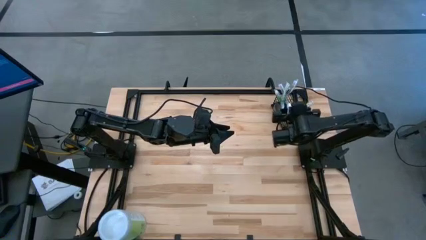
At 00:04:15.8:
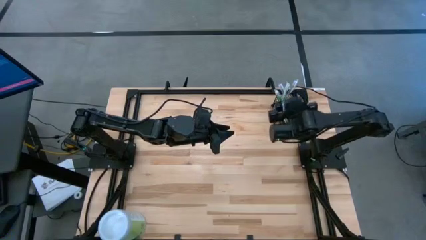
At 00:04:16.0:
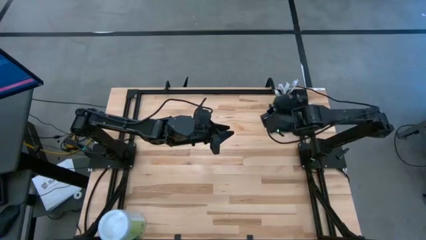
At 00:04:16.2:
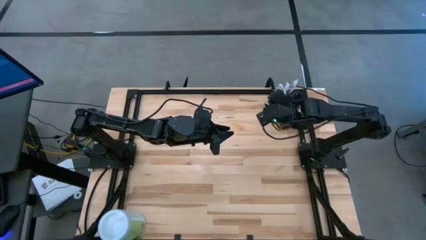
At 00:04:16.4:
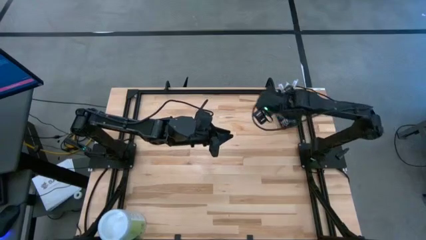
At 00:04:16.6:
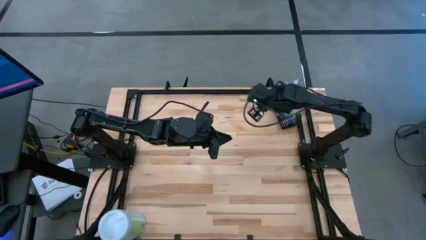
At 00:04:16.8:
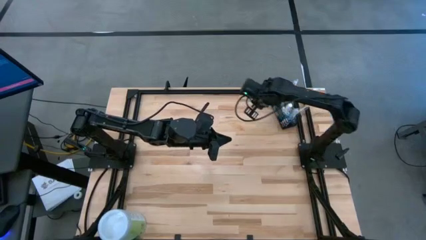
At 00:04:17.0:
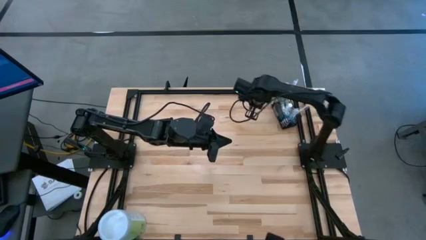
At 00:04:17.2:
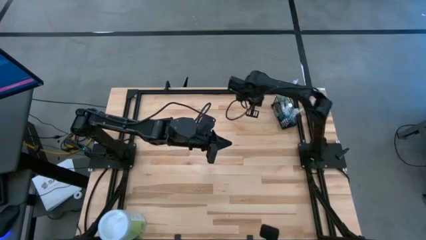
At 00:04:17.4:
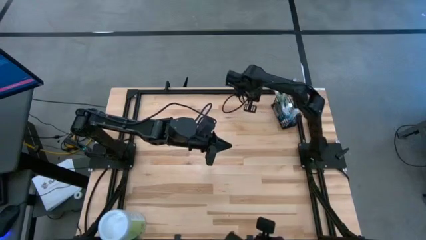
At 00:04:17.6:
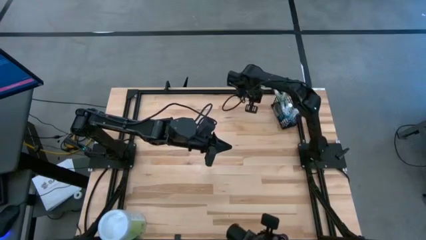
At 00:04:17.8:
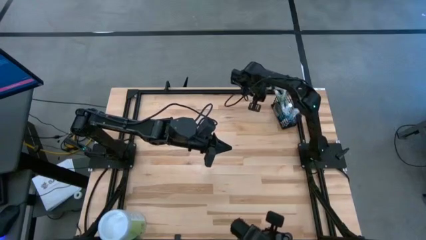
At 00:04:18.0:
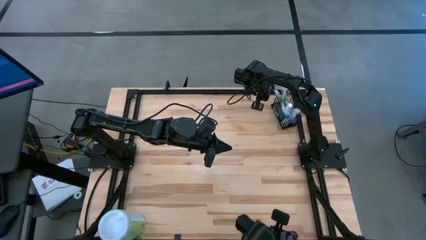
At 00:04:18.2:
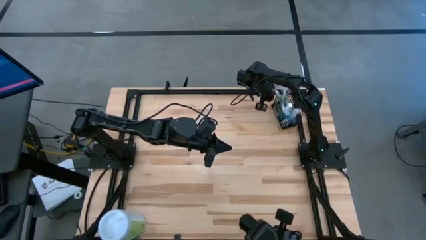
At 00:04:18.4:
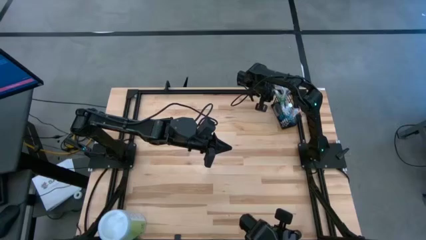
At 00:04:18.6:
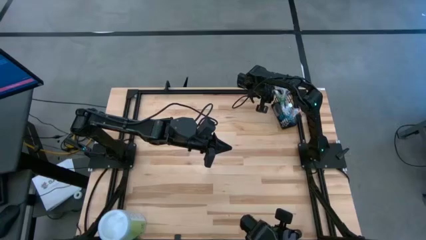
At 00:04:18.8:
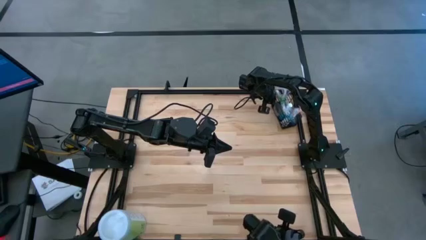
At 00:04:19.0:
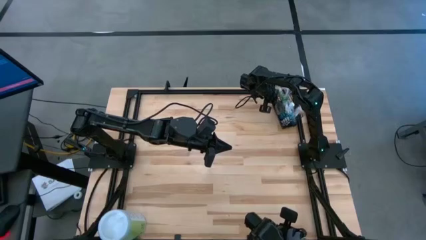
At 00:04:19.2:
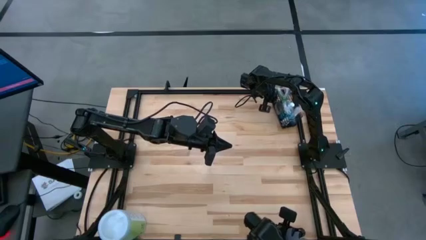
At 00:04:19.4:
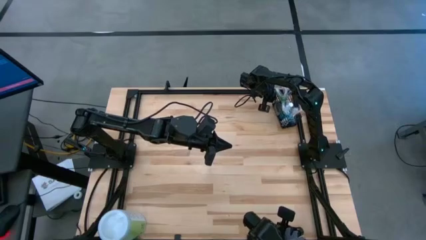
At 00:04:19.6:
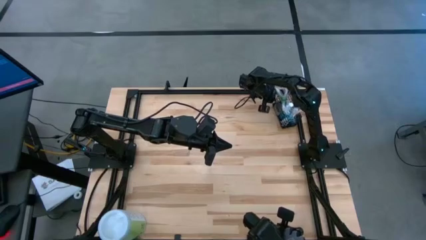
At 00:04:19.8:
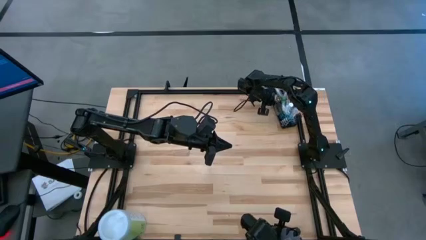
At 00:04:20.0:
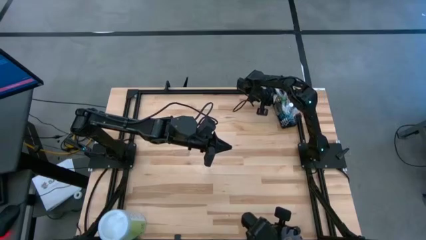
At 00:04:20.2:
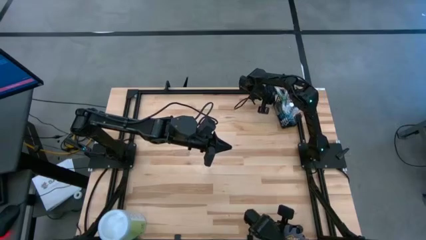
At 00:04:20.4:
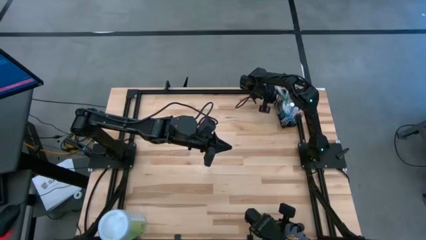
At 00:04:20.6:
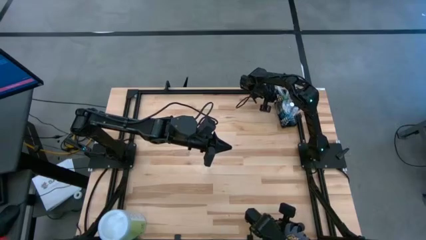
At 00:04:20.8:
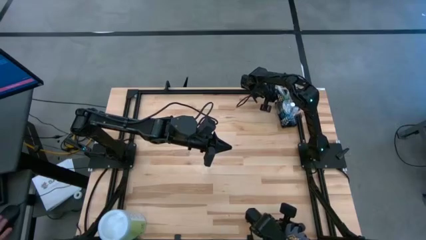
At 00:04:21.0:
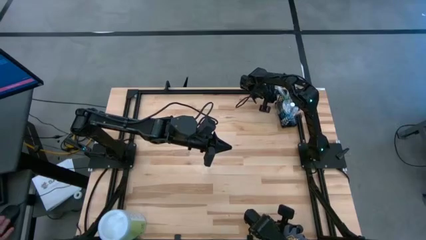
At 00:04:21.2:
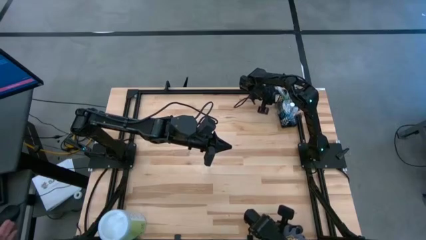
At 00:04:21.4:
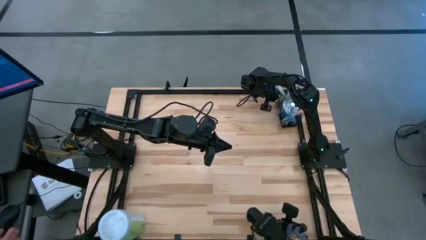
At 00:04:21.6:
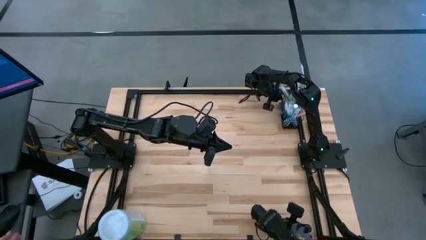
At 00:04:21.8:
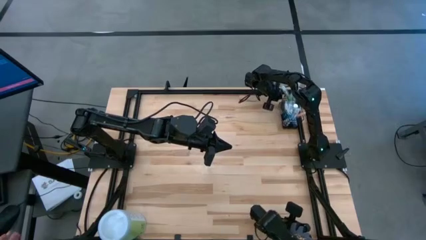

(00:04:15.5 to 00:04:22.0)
Task: Pick & Place toothbrushing station
Adjust the wire organizer

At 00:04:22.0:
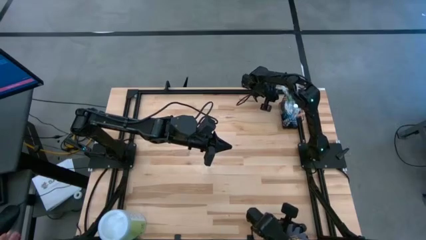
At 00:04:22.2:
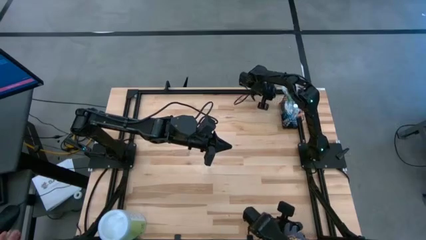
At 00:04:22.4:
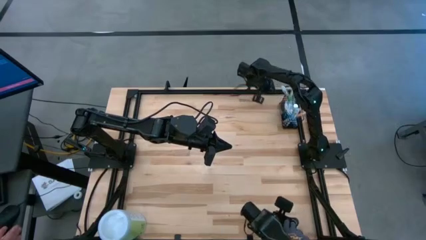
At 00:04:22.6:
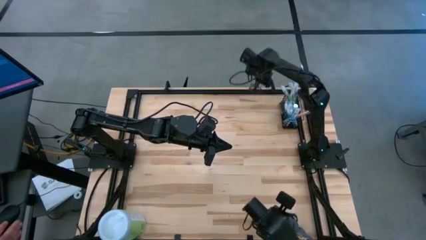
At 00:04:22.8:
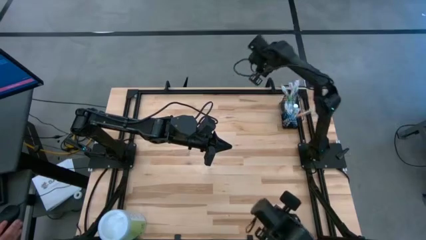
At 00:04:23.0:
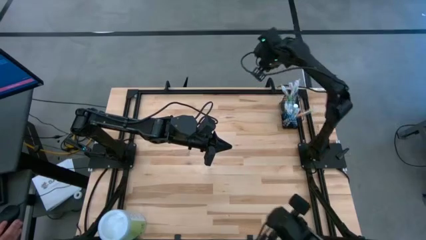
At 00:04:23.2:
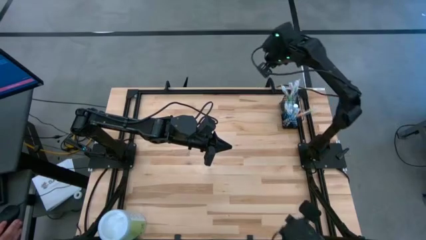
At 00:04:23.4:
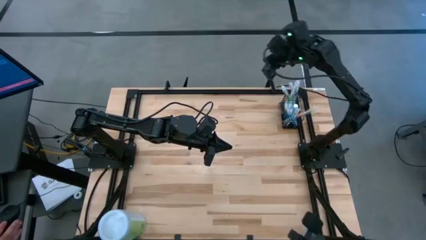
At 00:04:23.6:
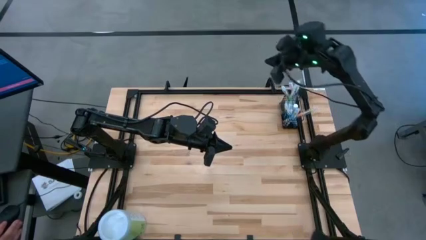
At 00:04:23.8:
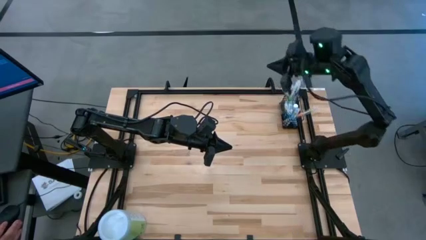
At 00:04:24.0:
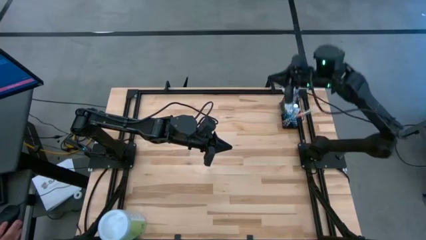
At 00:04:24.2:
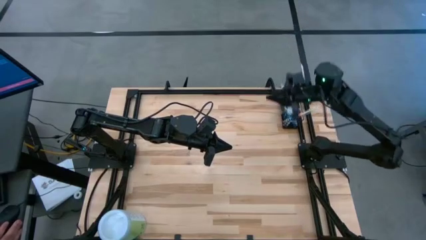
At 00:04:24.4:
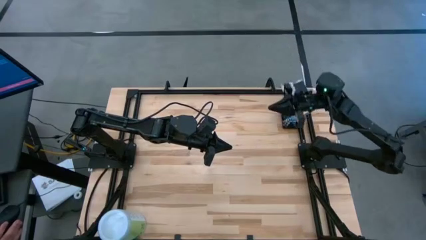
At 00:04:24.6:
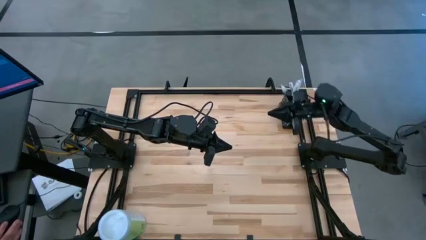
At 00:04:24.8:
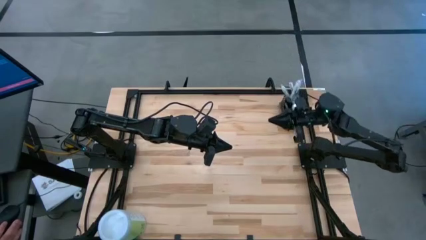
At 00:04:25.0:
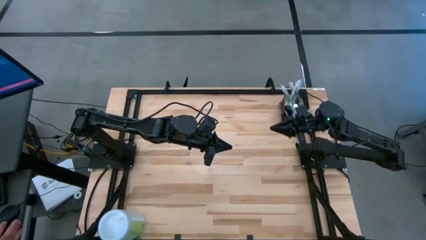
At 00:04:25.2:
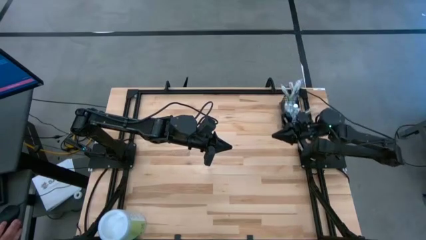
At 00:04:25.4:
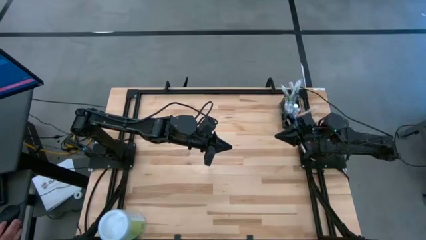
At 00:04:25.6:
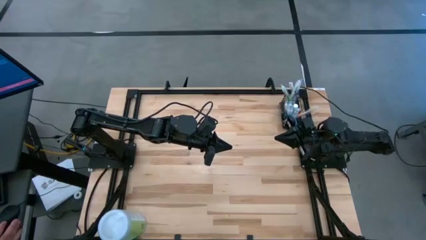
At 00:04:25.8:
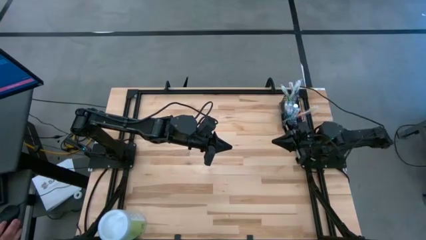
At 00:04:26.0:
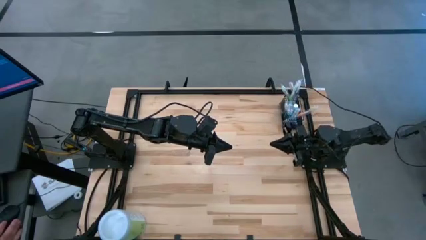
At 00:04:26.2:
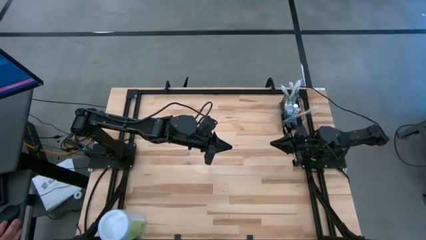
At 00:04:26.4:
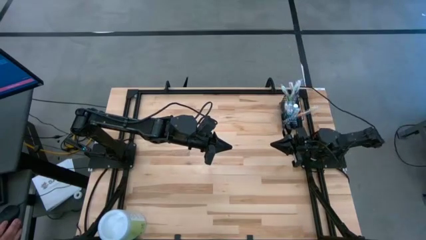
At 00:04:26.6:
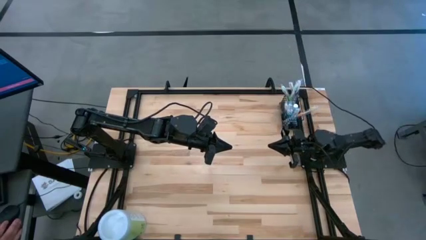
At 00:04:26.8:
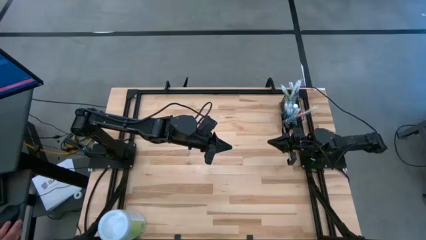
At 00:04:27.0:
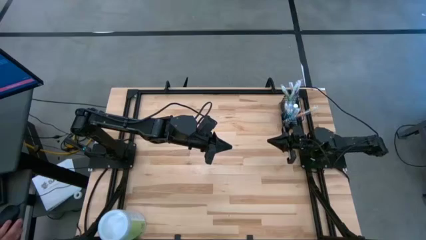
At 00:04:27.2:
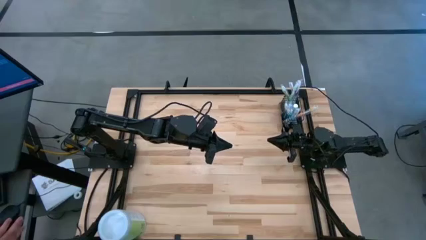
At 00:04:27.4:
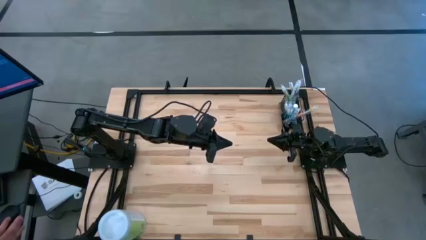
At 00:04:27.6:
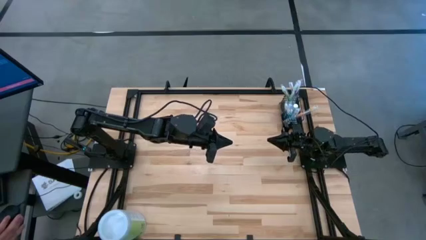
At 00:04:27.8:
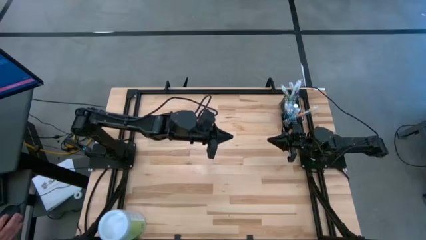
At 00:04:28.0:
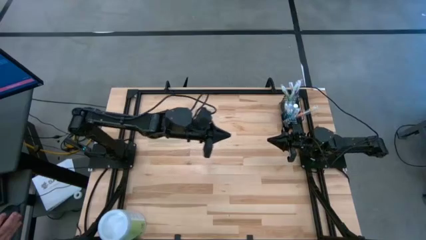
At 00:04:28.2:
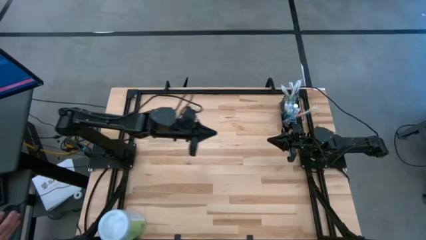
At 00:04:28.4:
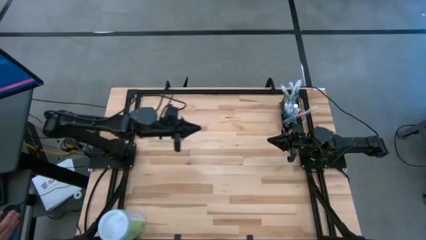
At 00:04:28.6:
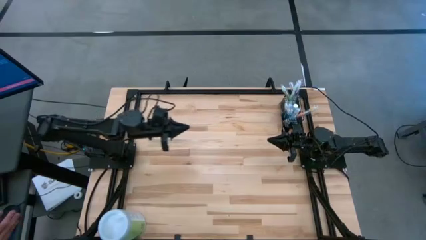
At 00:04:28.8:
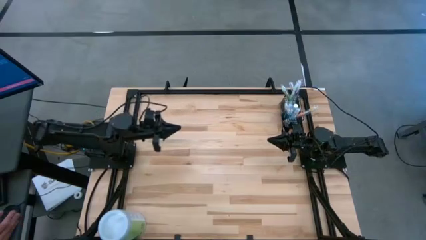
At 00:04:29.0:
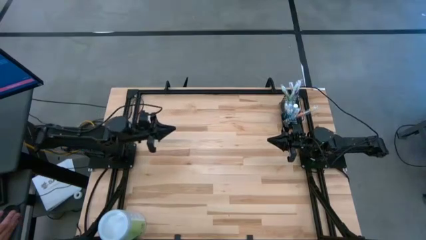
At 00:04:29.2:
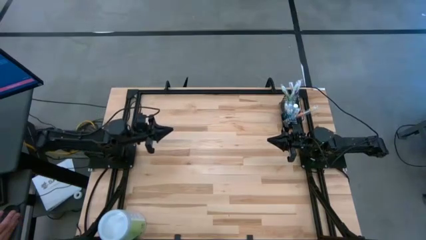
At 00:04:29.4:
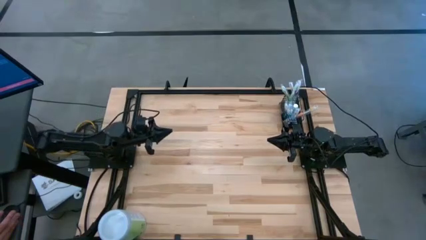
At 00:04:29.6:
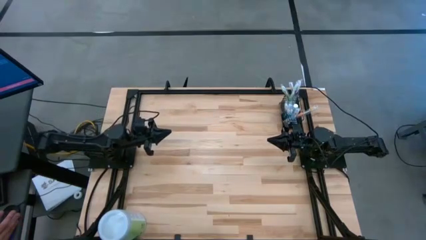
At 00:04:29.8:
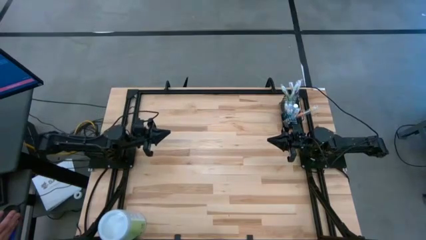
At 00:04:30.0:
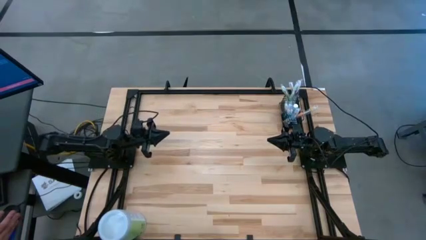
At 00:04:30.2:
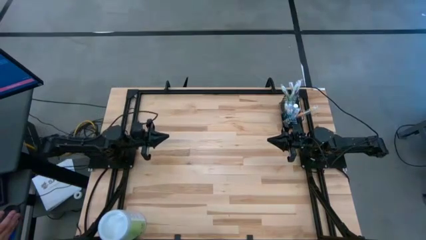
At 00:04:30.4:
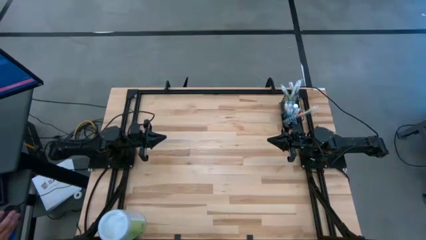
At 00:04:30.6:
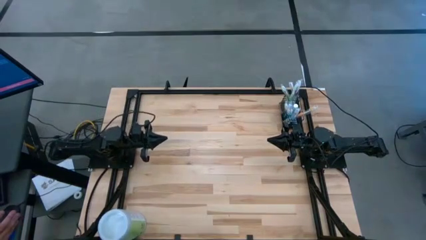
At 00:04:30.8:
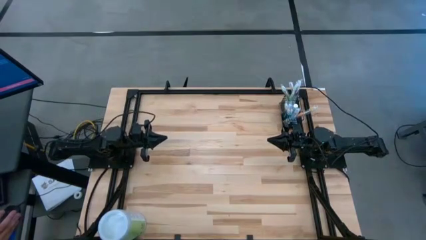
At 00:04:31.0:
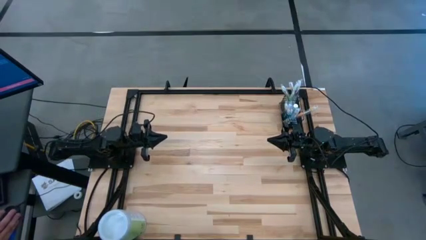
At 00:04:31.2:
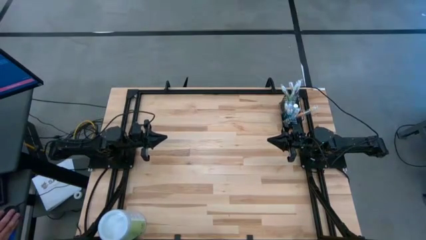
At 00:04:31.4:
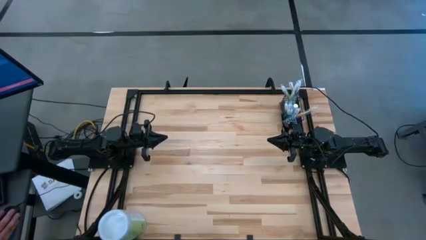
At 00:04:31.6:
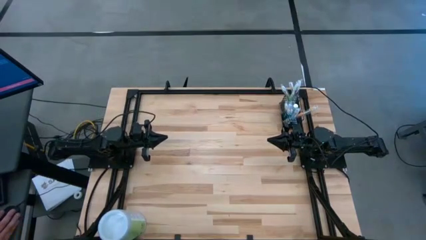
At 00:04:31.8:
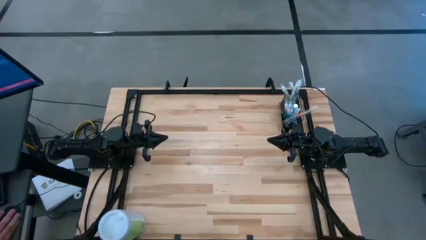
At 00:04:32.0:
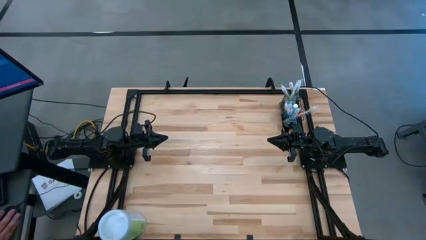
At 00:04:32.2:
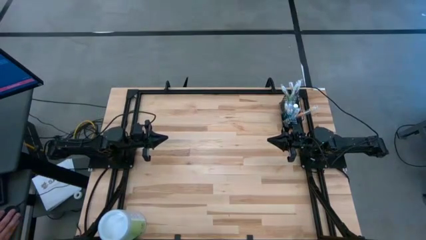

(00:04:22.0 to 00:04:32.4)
Return to Home Position
